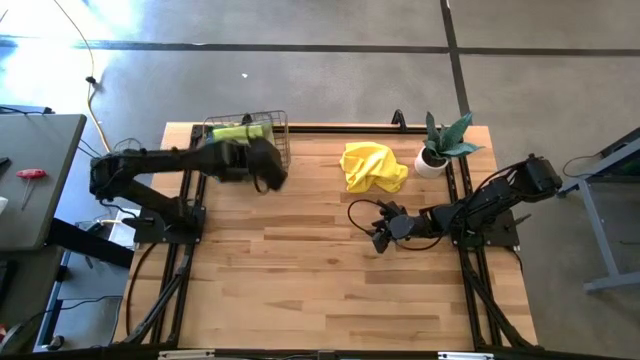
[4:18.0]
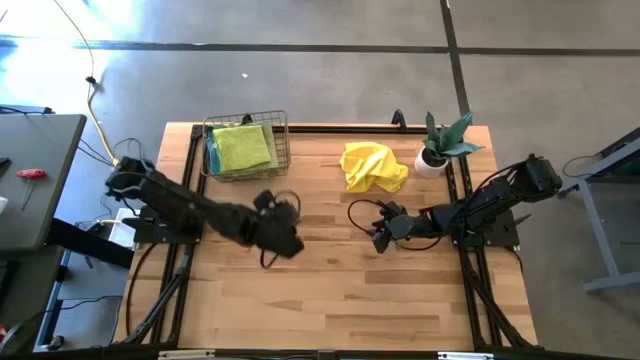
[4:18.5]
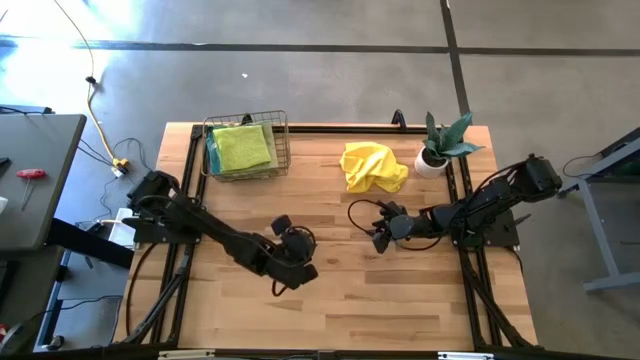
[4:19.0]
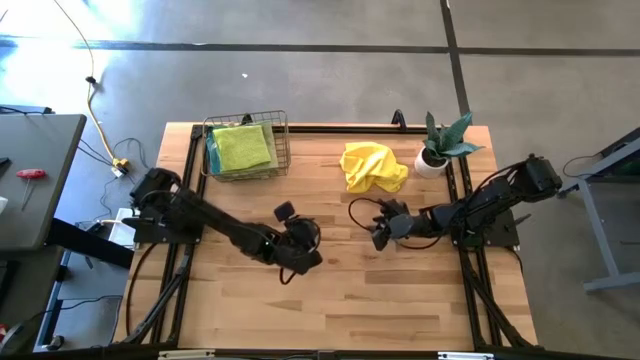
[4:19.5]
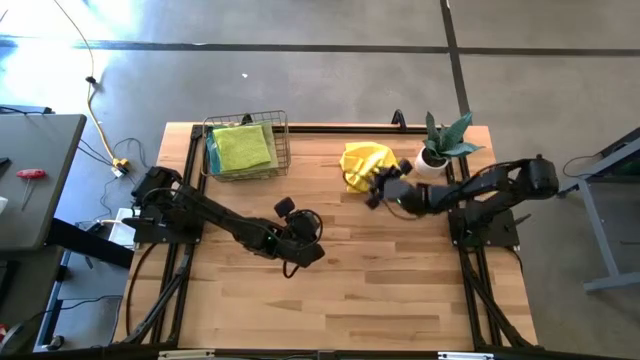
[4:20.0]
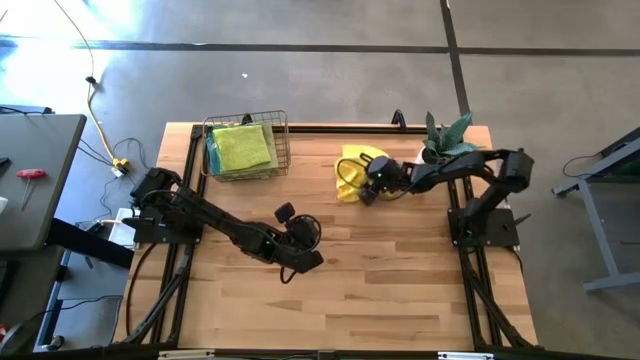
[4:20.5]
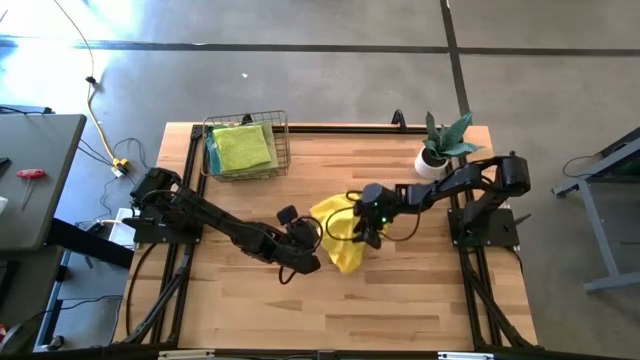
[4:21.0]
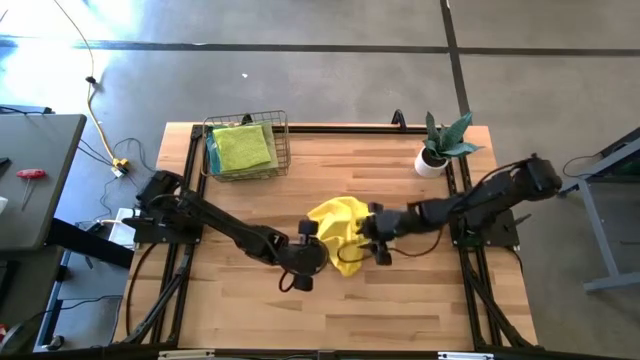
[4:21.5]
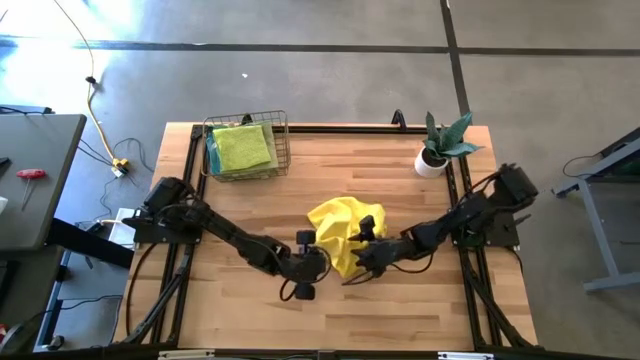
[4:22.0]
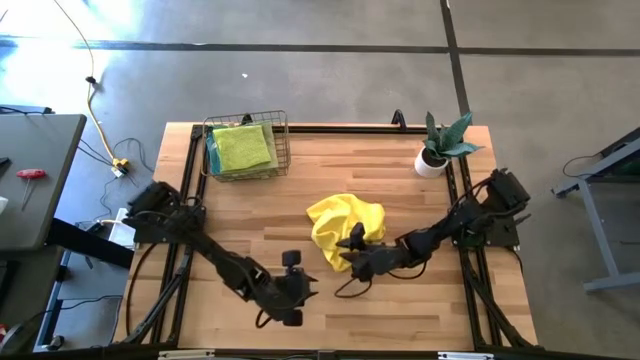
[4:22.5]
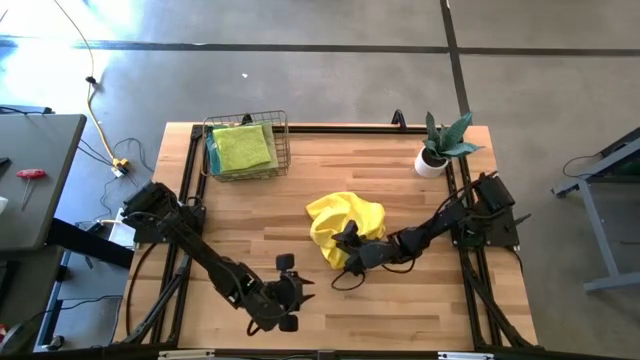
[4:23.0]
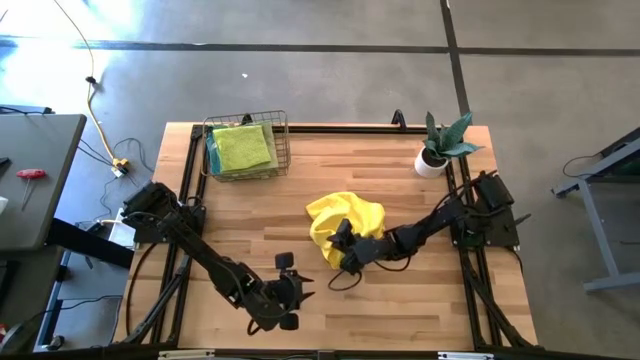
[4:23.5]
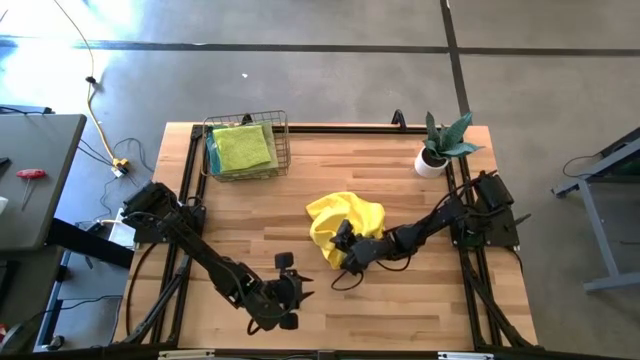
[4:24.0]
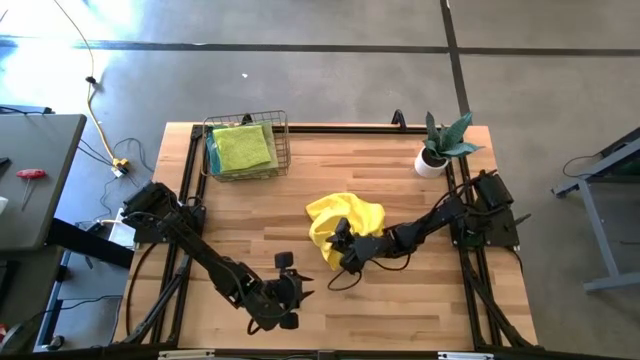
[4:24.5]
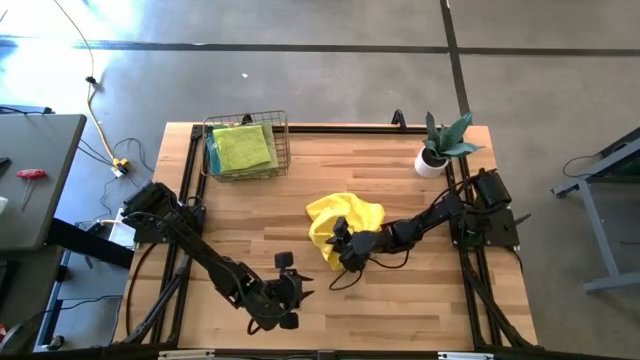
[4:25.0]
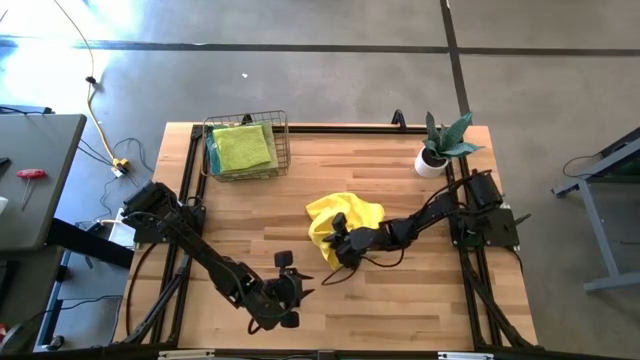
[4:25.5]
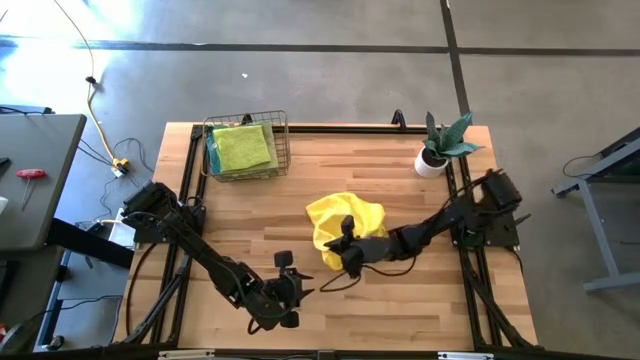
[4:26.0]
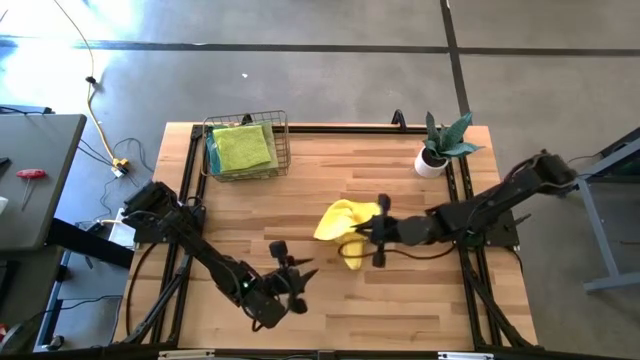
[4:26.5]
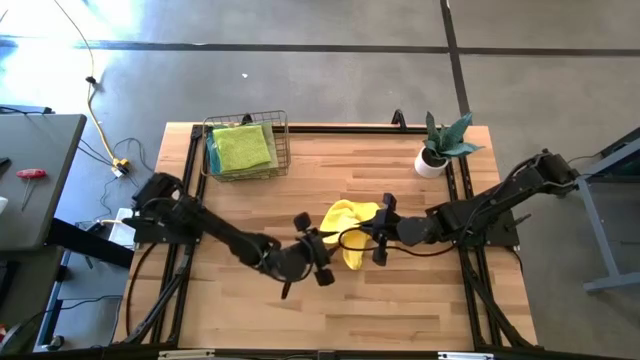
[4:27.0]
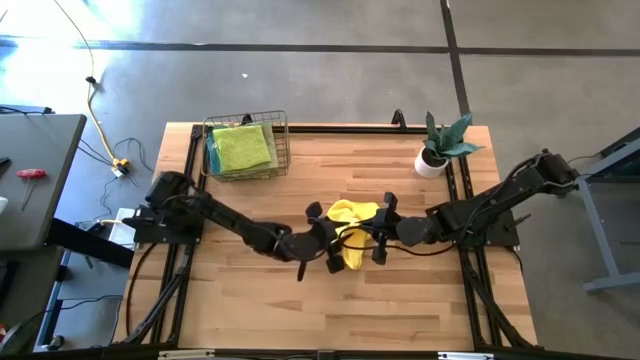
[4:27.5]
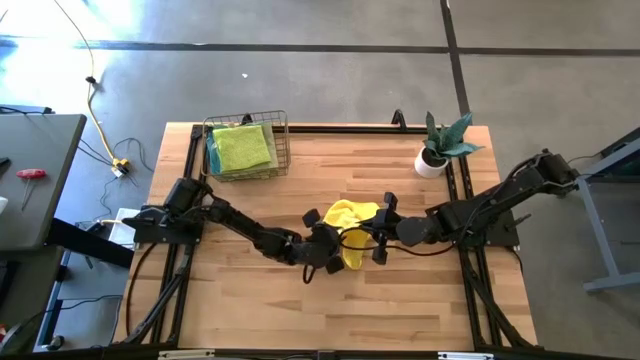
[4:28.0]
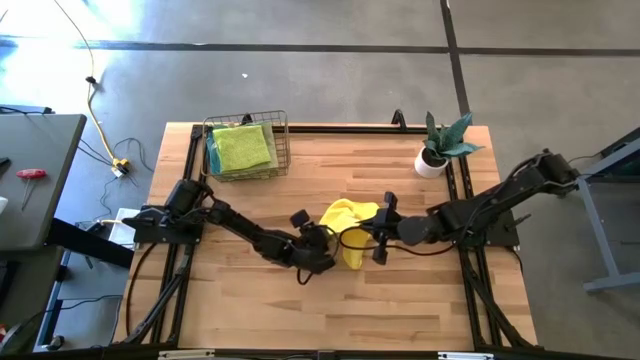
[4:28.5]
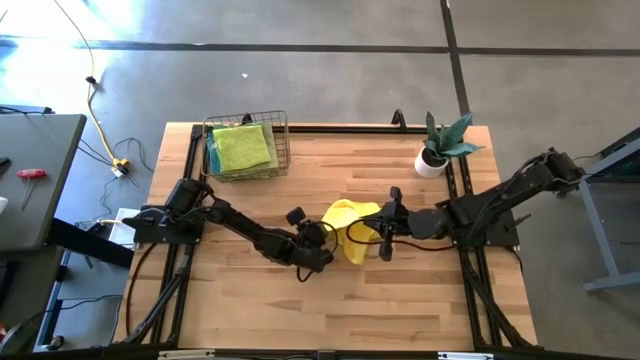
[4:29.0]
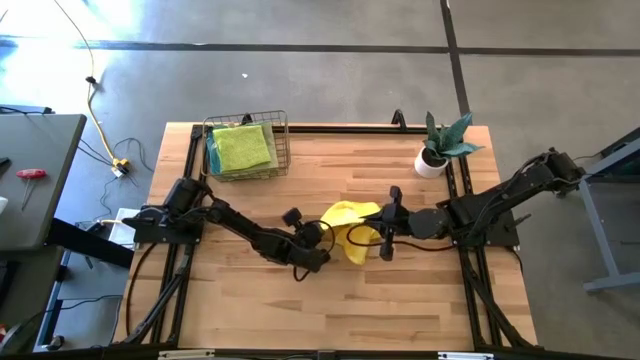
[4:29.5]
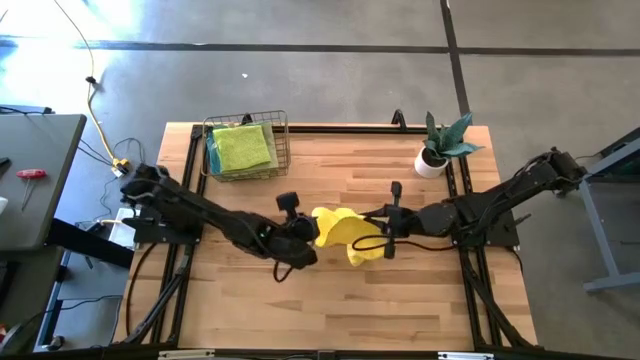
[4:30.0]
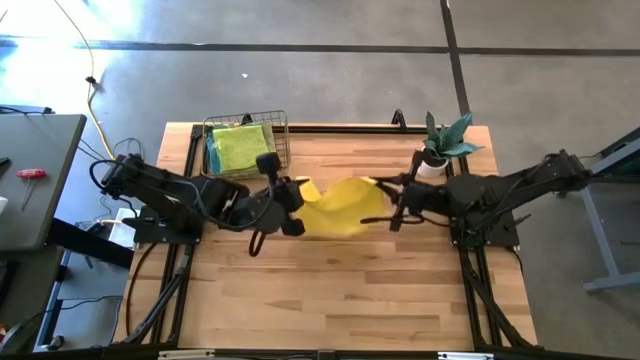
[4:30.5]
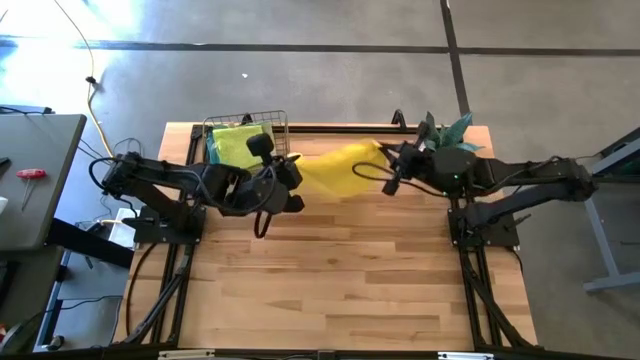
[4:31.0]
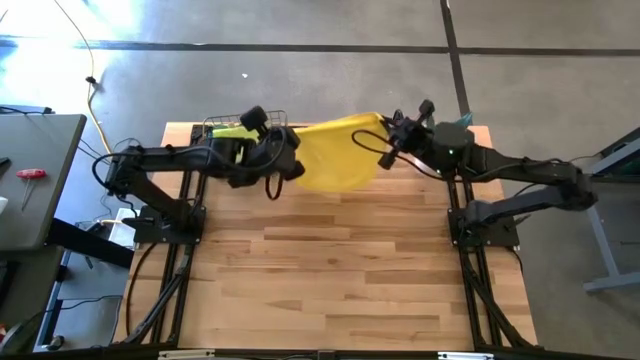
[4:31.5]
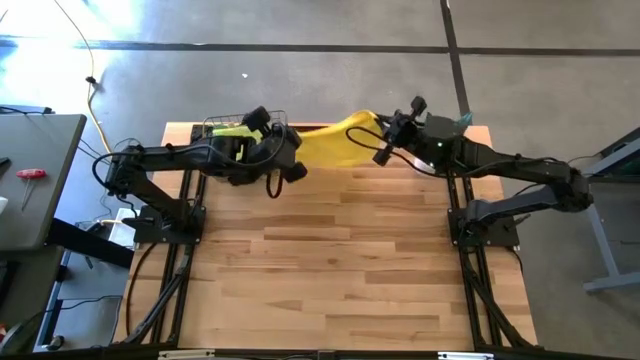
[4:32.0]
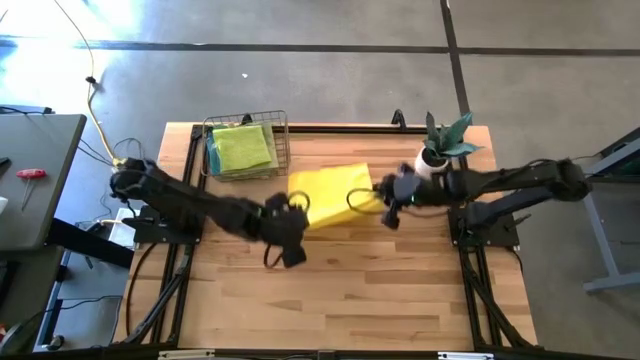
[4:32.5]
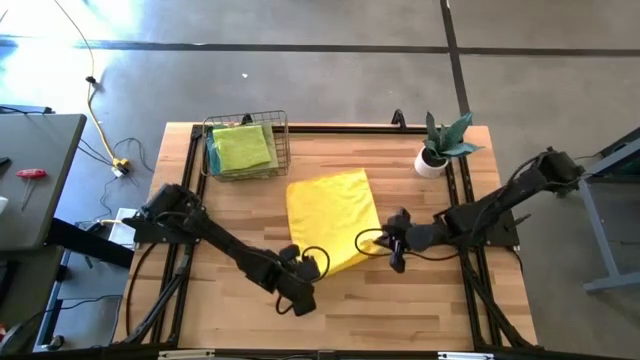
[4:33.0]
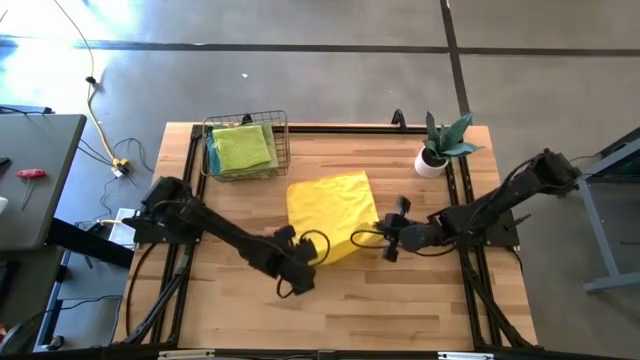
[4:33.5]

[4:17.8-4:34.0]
Task: Fold microfiber towels
Fold the yellow towel

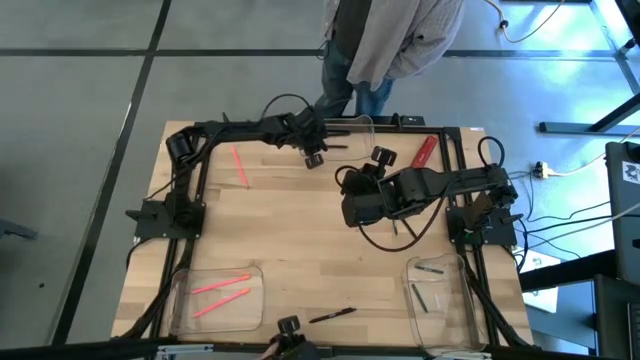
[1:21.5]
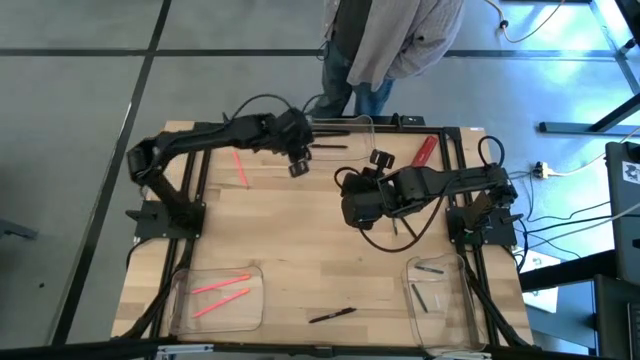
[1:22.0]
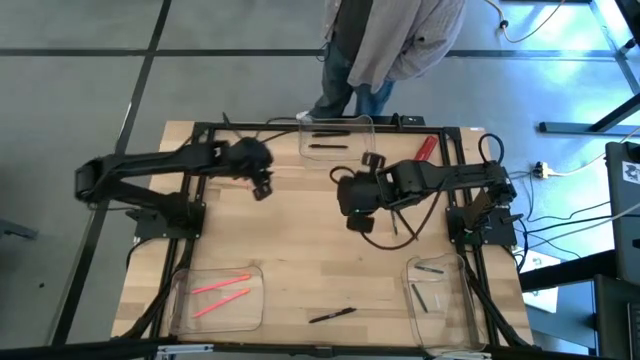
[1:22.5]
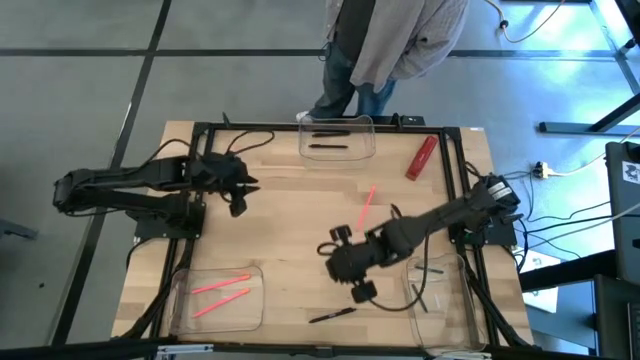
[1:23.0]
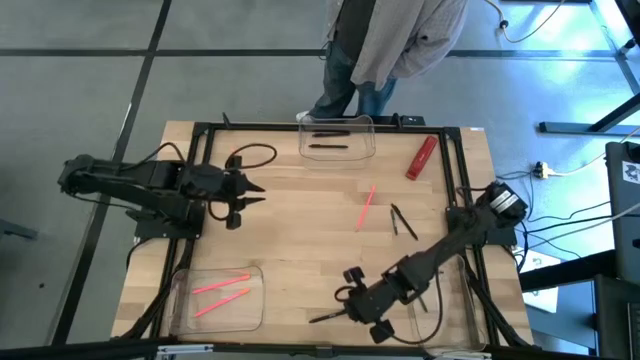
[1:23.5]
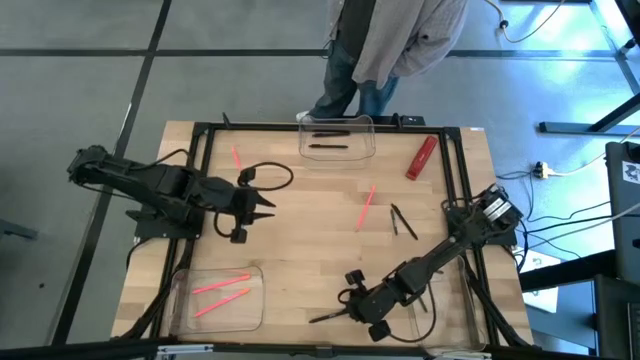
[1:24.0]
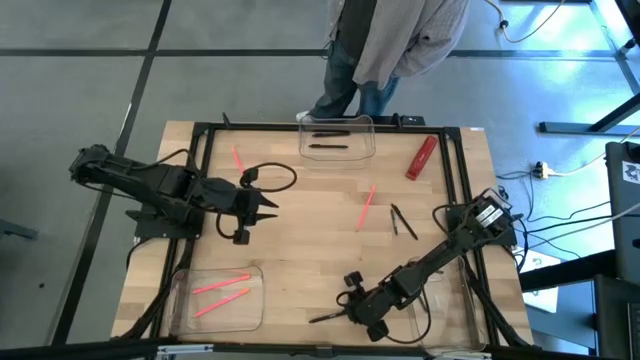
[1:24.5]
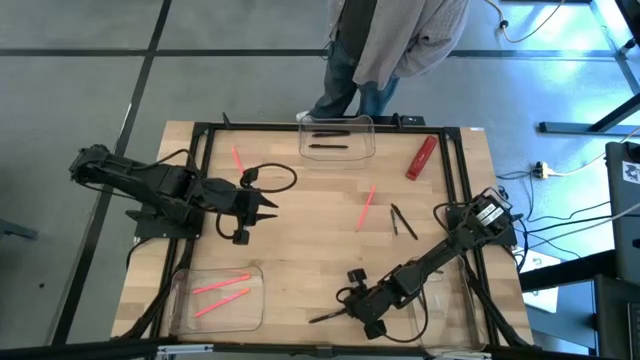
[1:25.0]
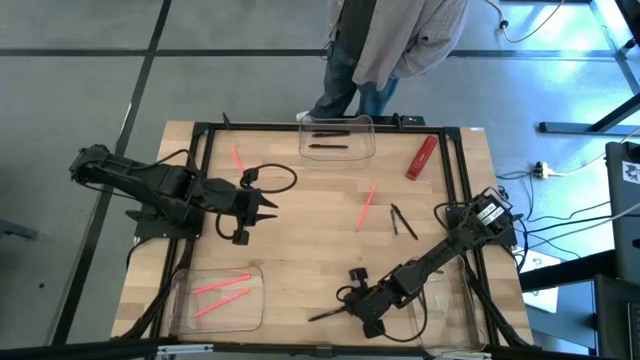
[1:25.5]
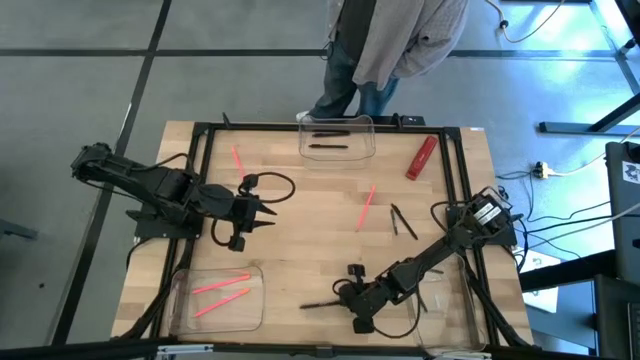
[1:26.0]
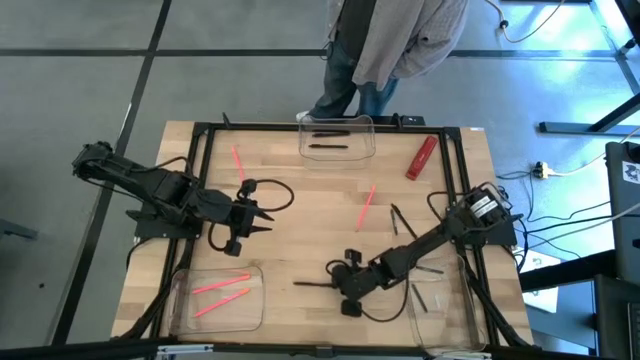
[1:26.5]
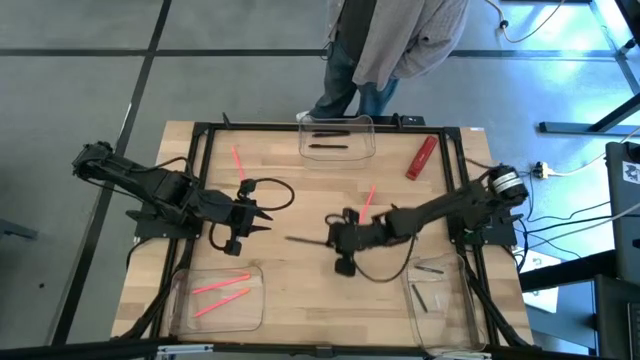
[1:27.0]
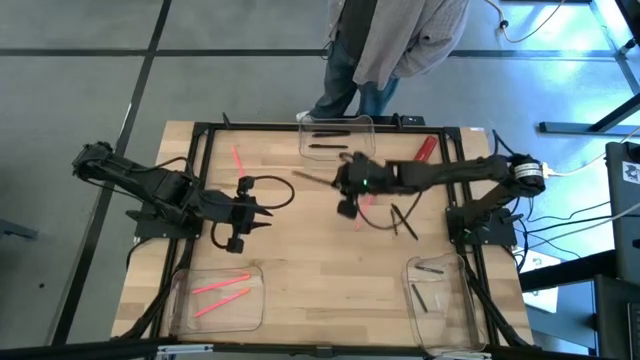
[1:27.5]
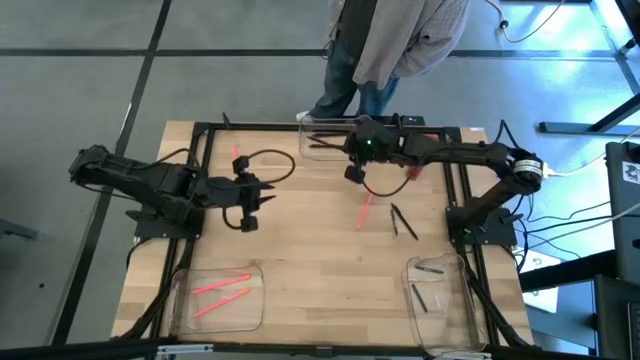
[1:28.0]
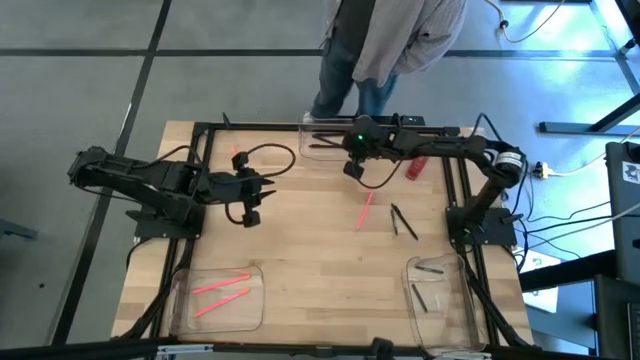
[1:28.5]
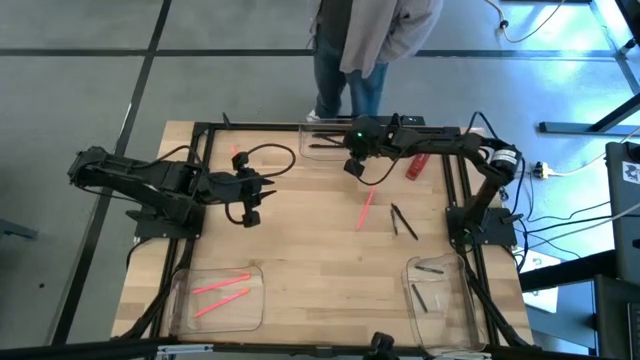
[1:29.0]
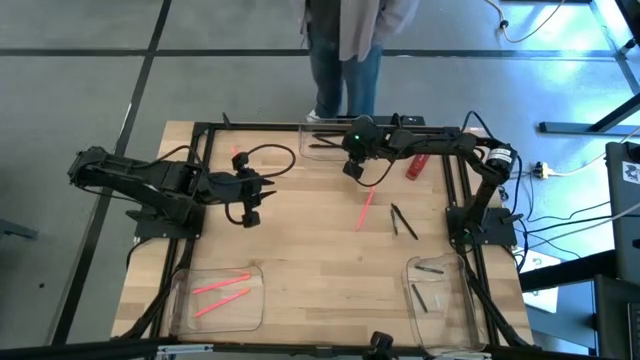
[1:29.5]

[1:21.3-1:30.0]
Task: Sort crayons/erasers/pens/pencils in bins
Put the black pen into the top transparent bin
